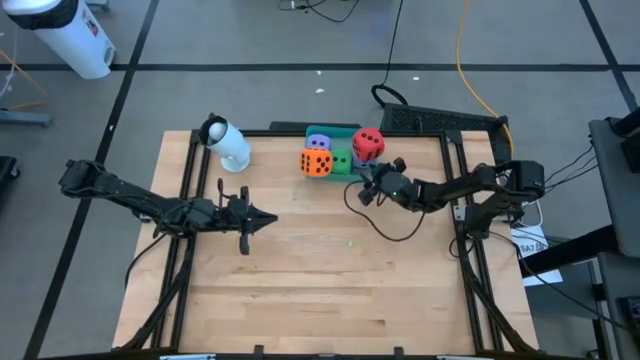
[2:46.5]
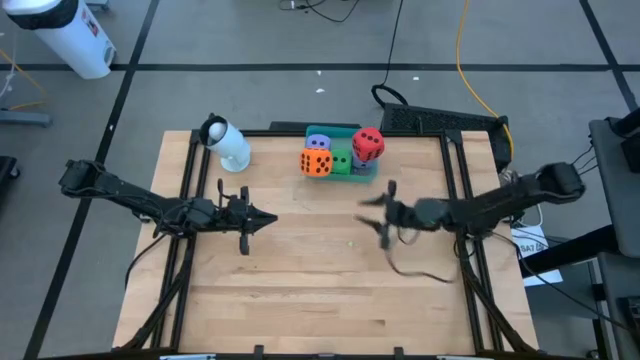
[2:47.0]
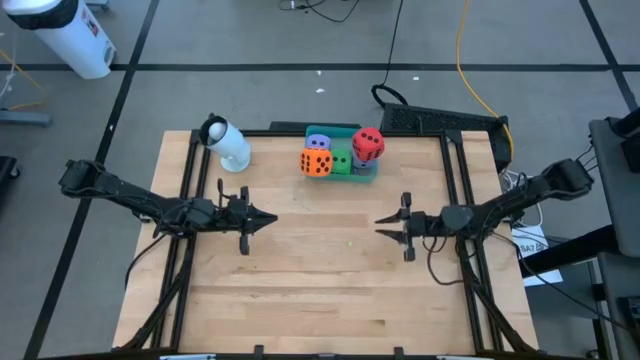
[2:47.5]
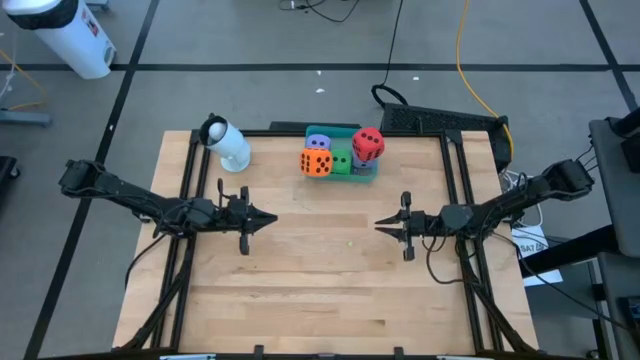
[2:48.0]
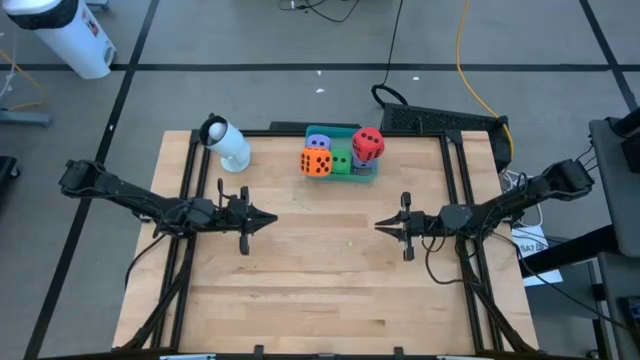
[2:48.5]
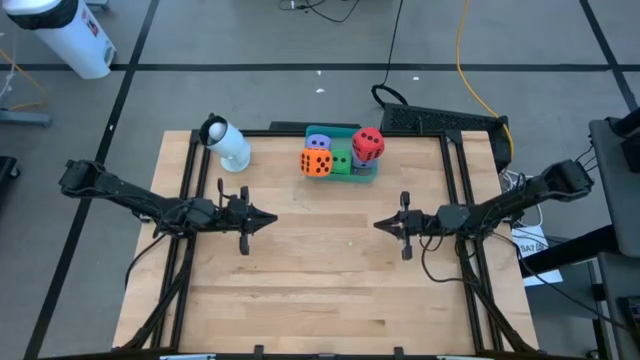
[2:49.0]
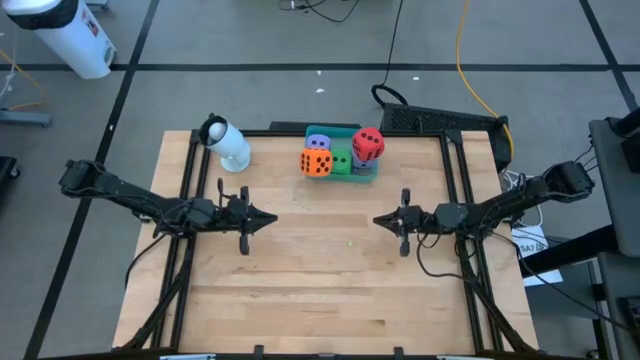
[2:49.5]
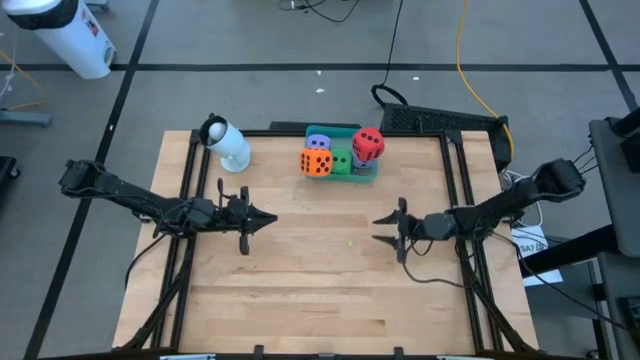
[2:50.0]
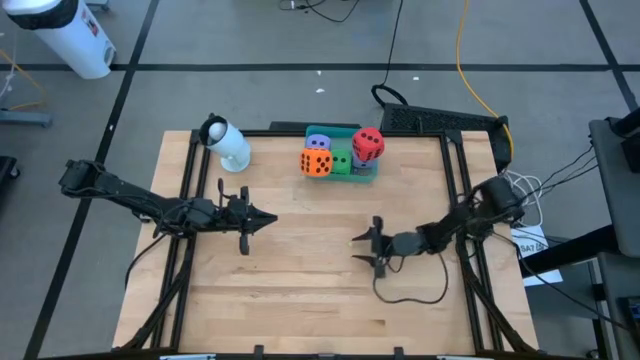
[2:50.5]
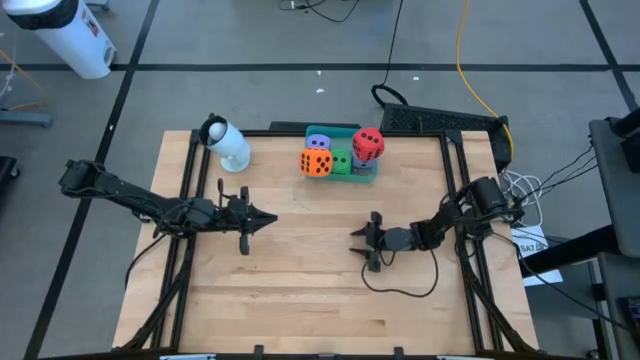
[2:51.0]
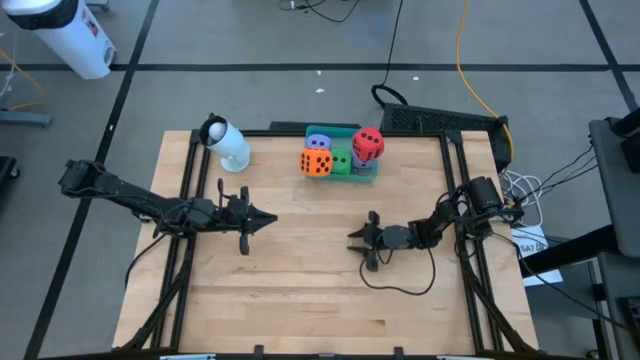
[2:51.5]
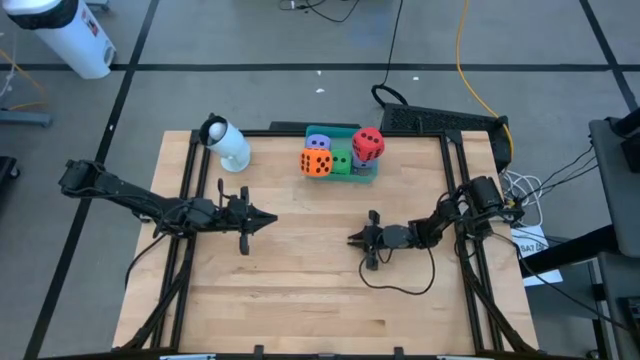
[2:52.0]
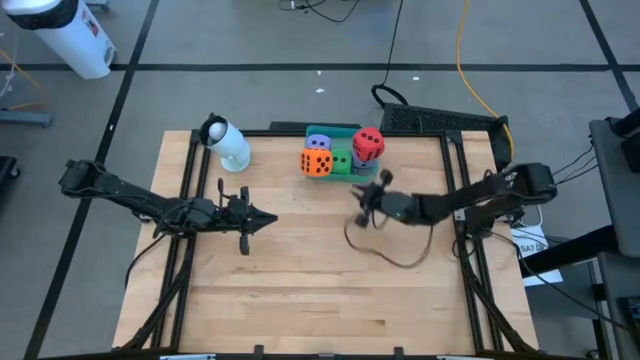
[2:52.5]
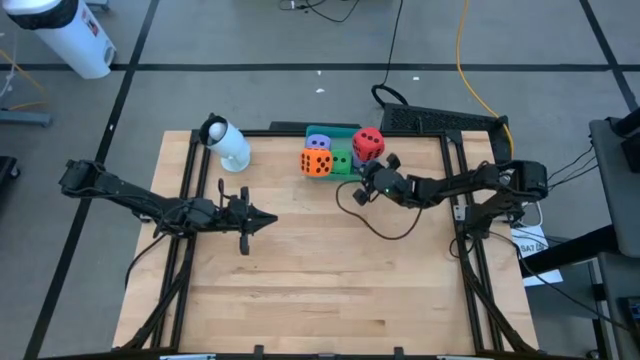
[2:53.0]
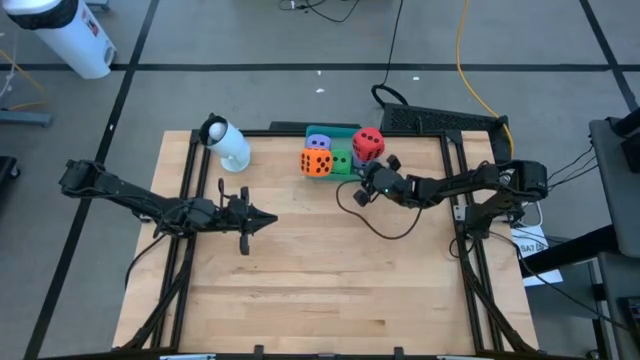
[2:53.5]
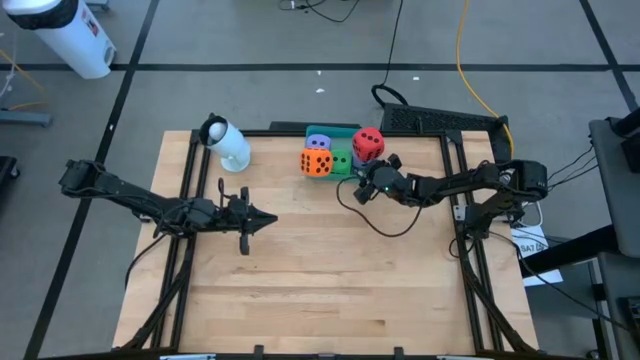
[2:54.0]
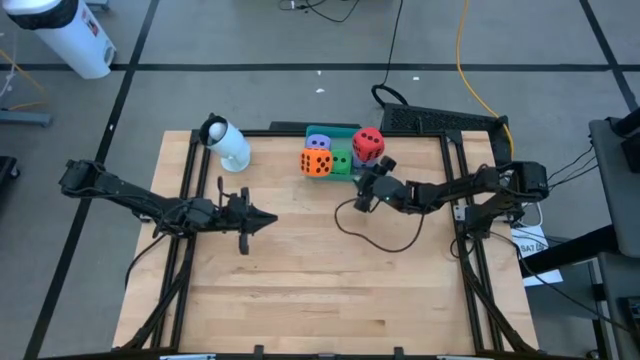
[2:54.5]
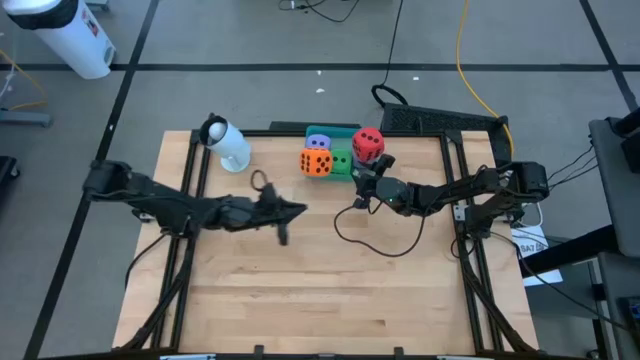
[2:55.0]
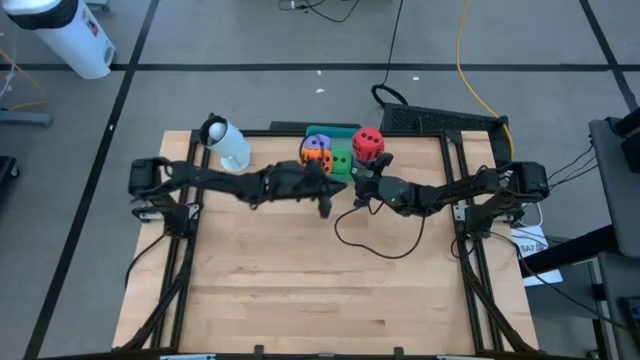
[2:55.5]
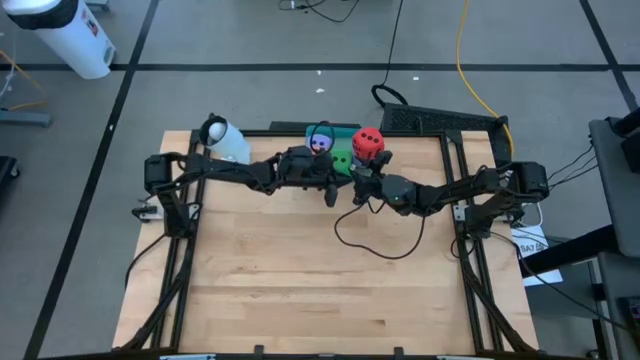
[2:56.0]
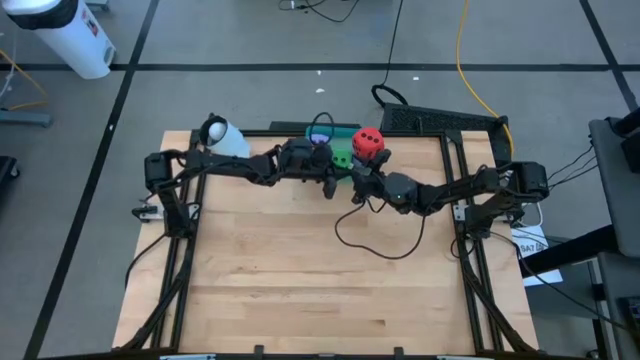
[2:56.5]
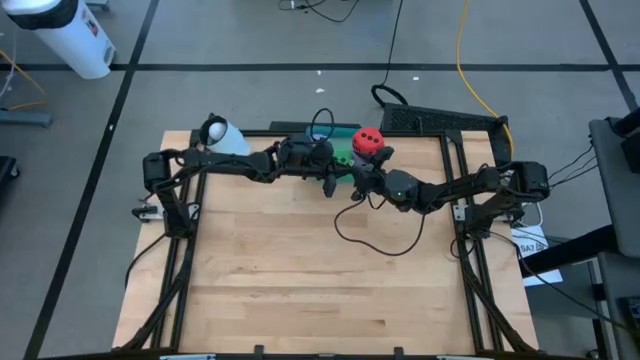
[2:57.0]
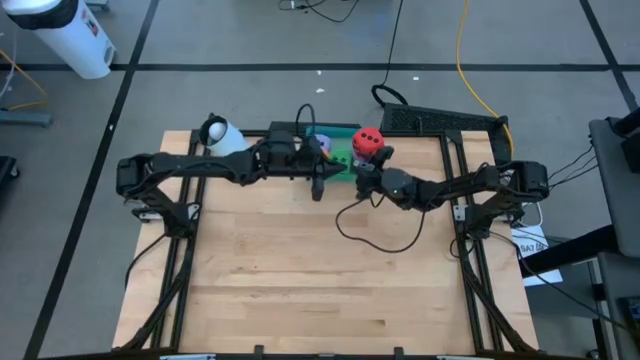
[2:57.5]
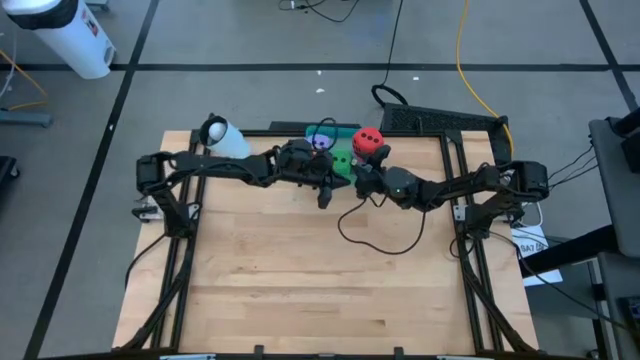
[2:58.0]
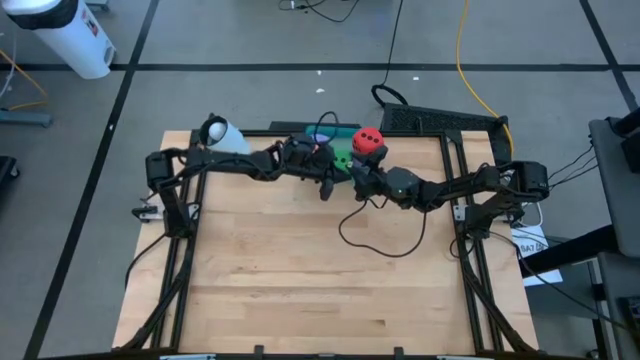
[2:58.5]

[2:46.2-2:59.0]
Task: Pick & Place Dice
Put the small green dice into the green bin

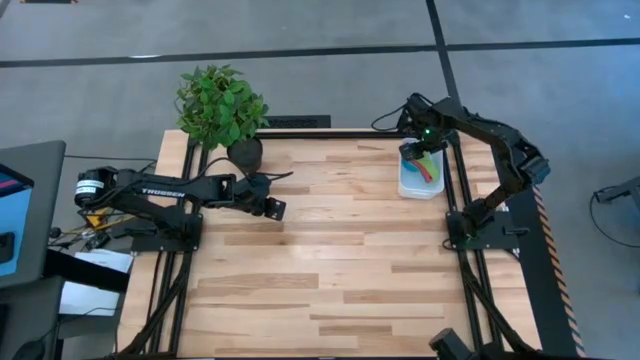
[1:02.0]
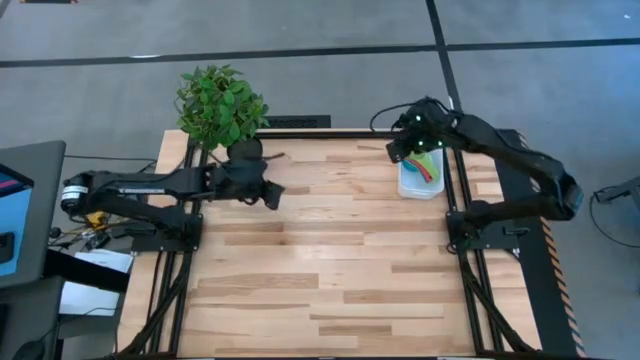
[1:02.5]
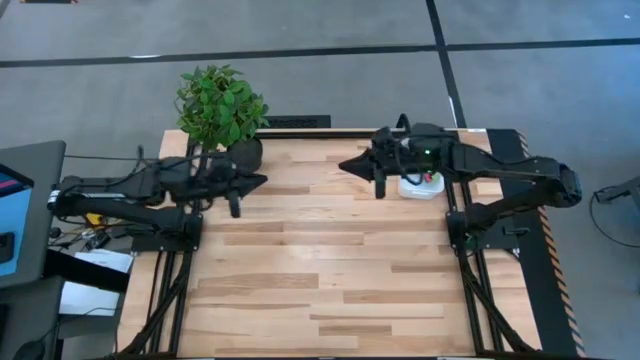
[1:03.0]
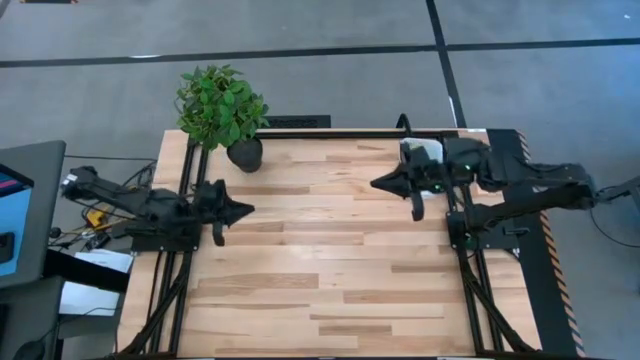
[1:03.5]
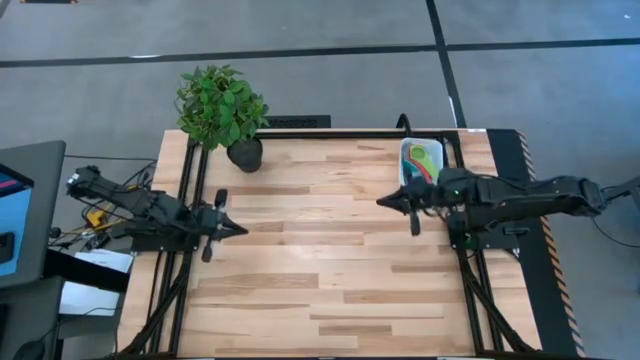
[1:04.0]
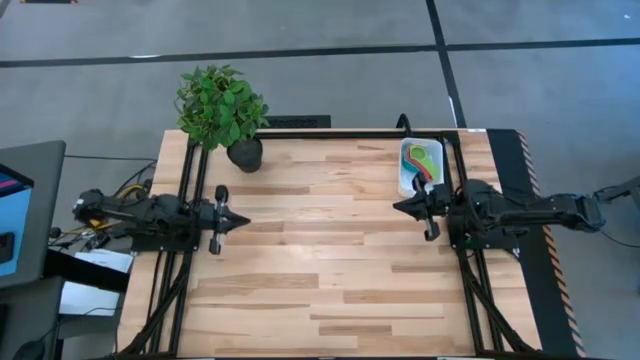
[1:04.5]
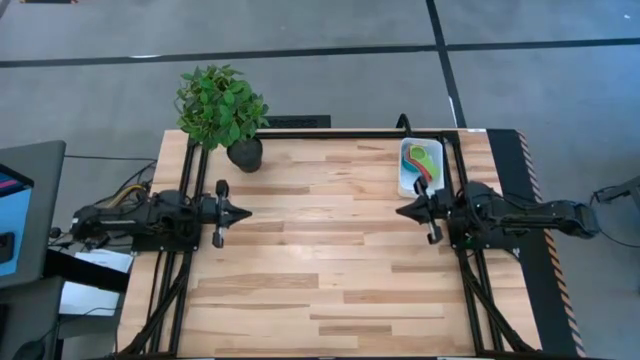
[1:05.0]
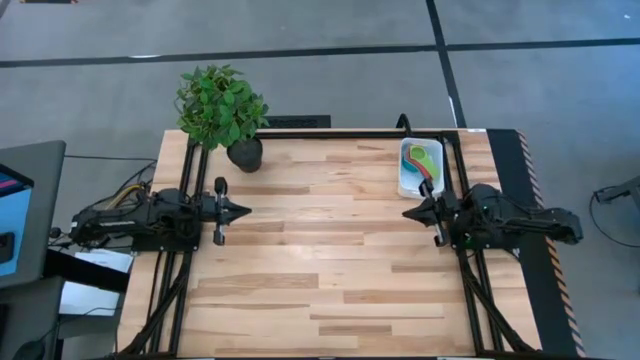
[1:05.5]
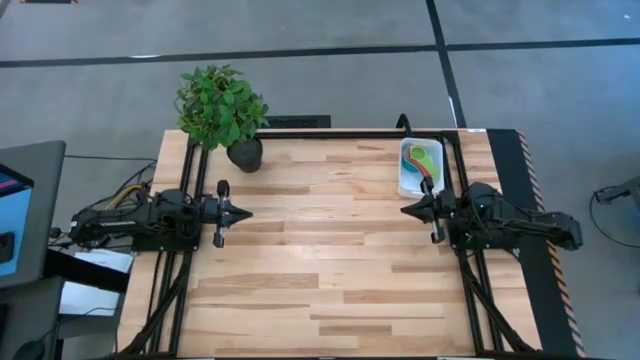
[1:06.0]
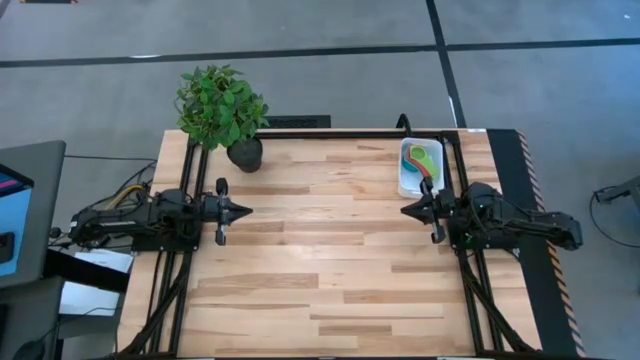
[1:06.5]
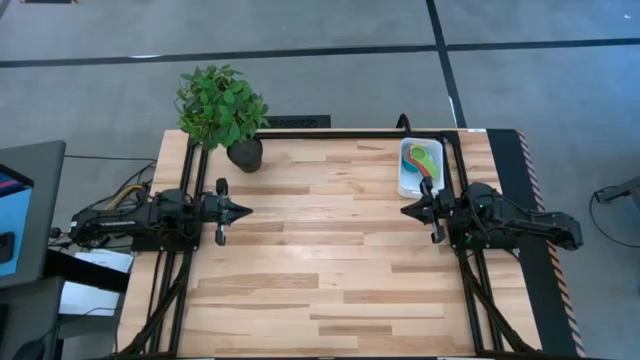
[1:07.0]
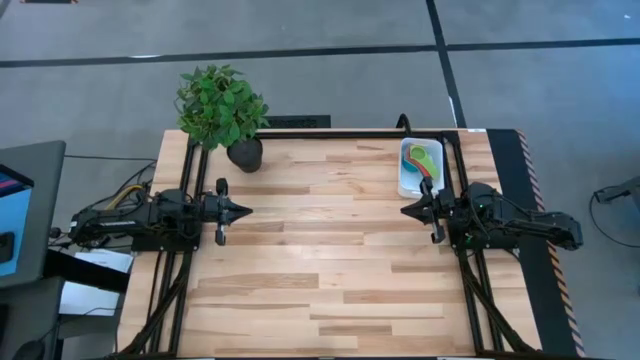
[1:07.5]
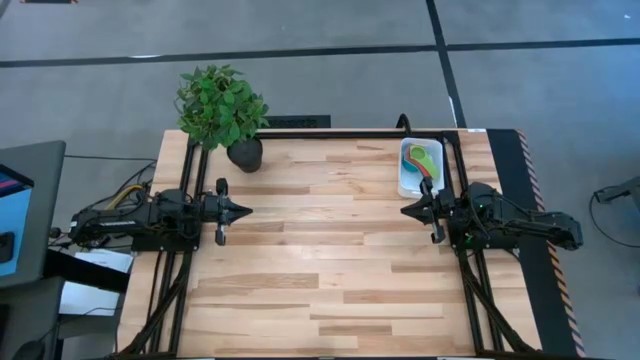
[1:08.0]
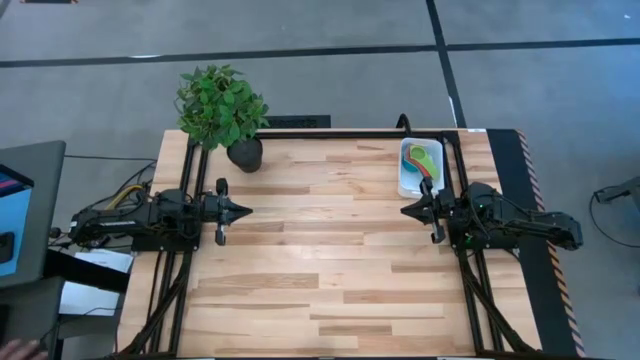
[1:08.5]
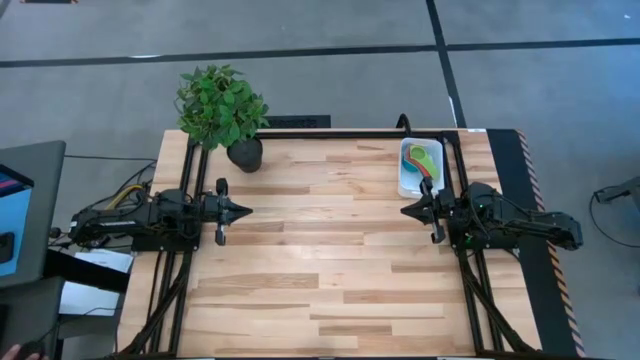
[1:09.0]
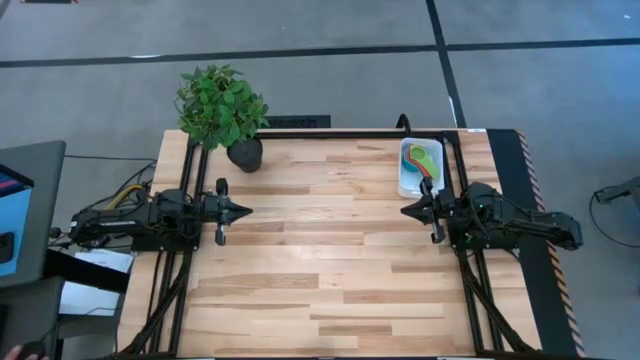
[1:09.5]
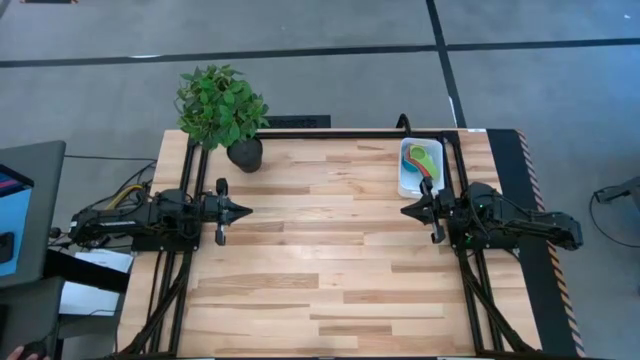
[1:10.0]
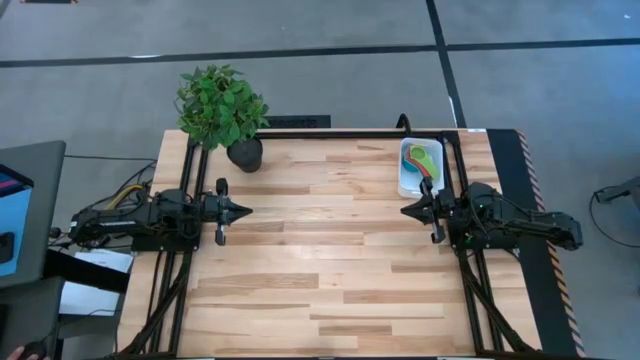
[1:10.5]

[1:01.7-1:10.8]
Task: Nest measuring cups in basket
Return to Home Position
